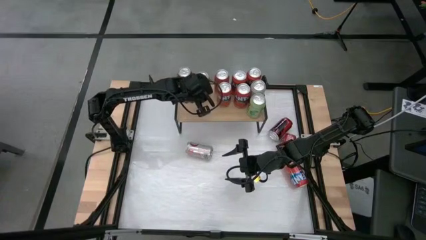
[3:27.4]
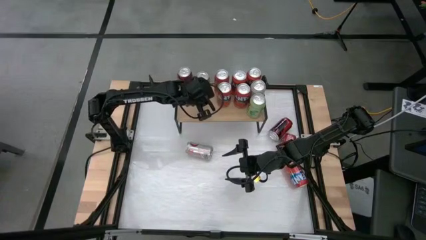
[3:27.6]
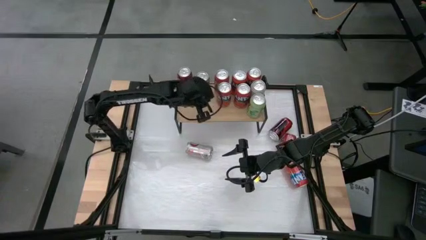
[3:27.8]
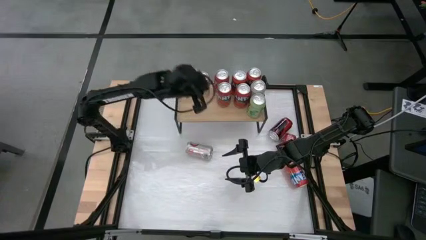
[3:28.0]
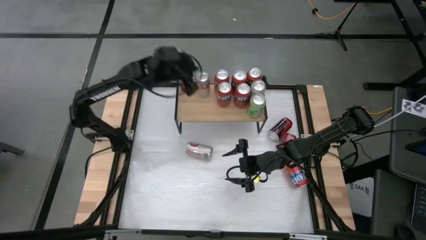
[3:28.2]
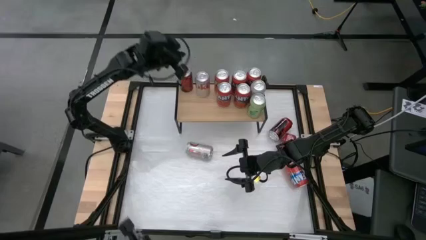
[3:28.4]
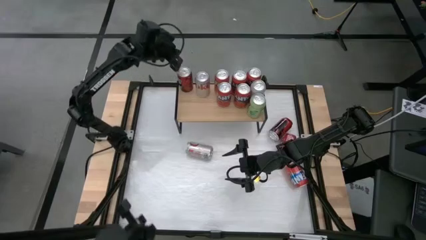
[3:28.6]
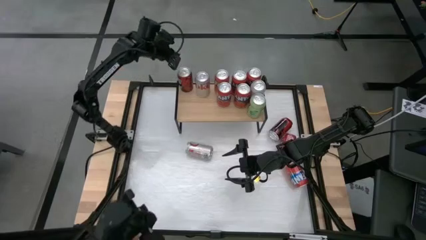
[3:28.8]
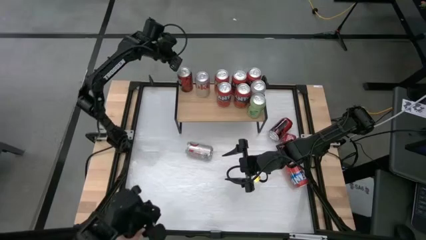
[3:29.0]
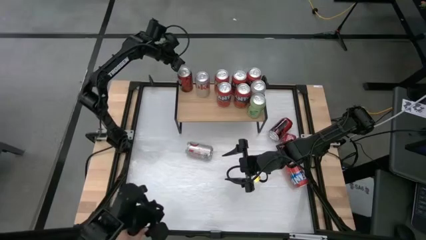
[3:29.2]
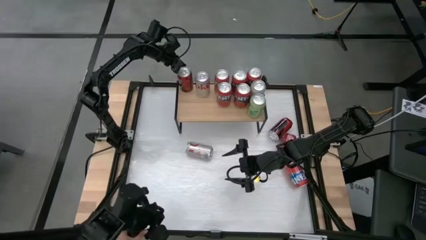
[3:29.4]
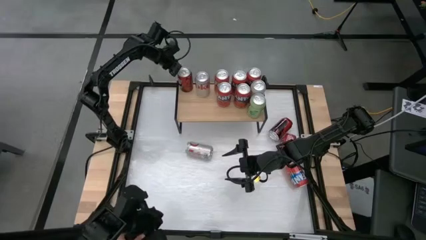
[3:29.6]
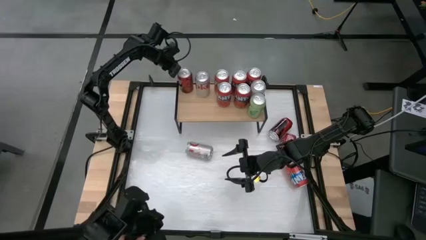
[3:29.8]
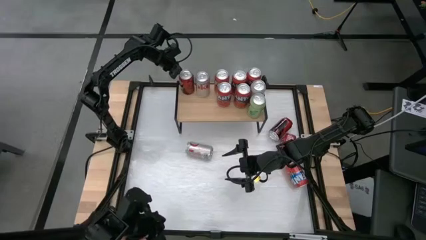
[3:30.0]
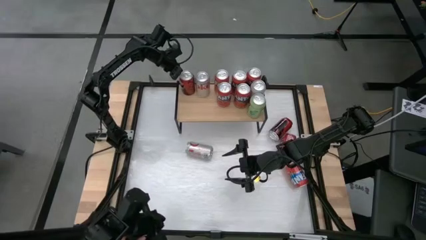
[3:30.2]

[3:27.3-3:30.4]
Task: Place canned beverage on shelf
Adjust the red black soda can on the shelf

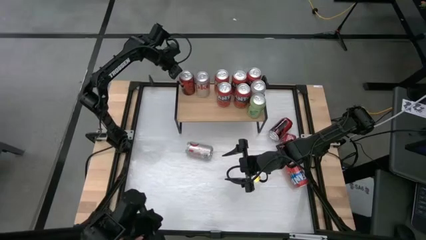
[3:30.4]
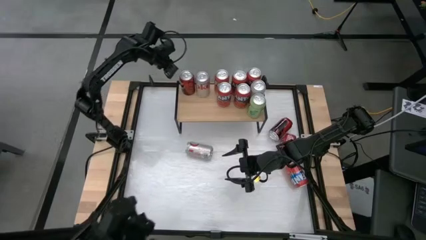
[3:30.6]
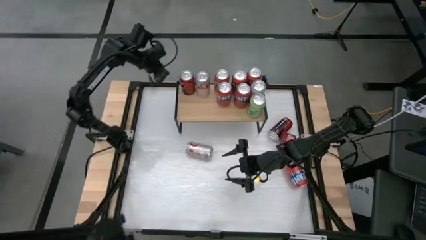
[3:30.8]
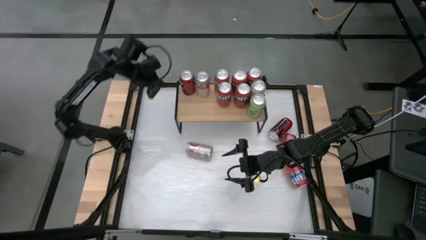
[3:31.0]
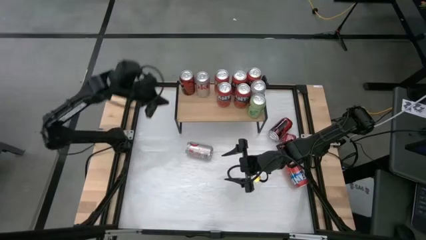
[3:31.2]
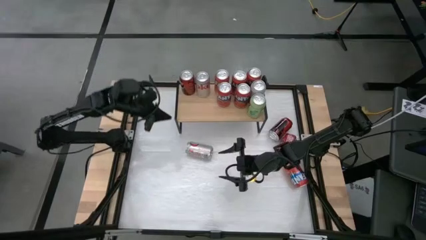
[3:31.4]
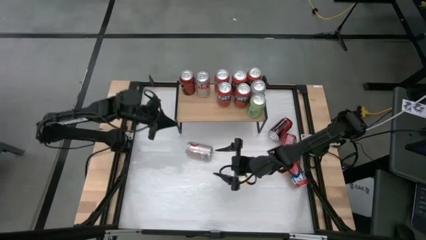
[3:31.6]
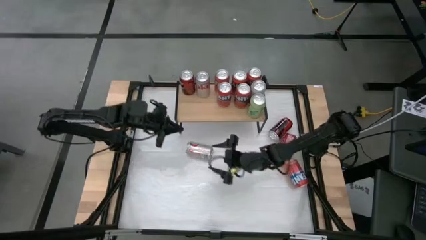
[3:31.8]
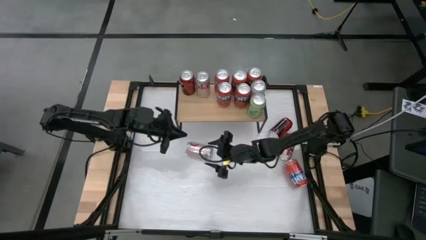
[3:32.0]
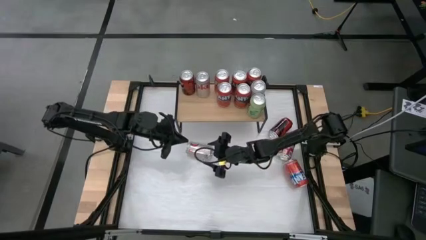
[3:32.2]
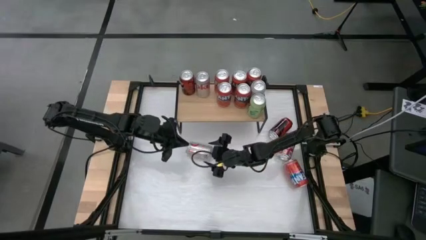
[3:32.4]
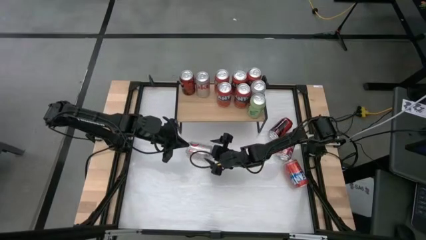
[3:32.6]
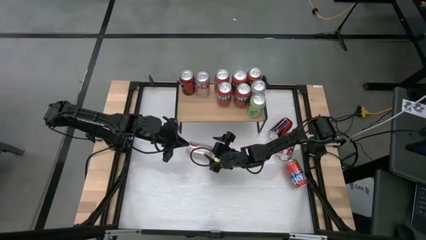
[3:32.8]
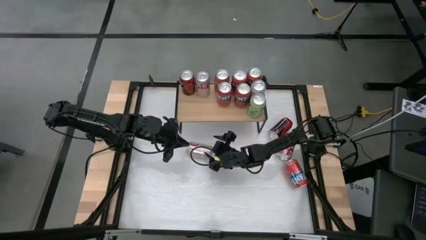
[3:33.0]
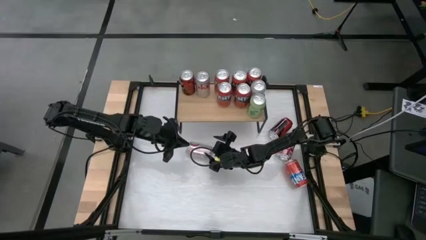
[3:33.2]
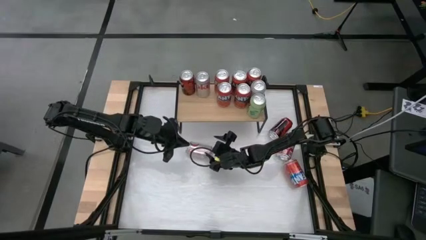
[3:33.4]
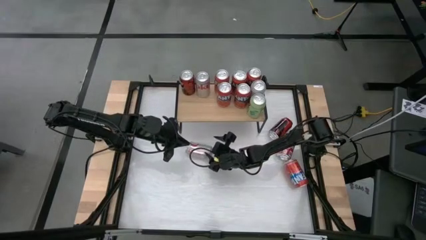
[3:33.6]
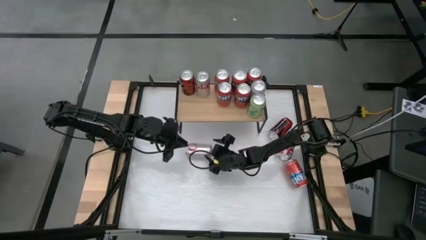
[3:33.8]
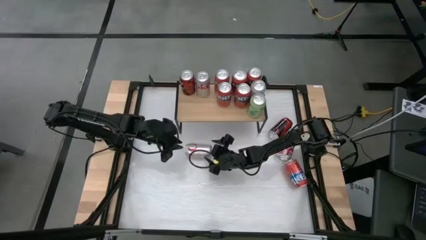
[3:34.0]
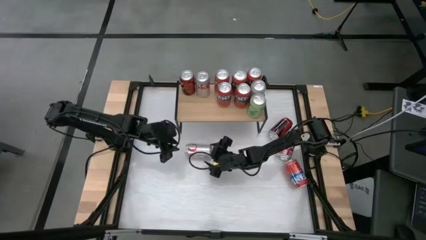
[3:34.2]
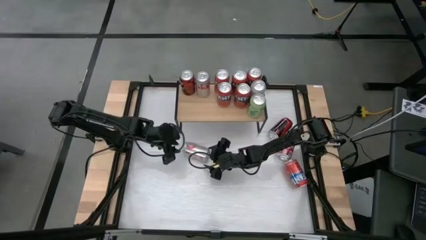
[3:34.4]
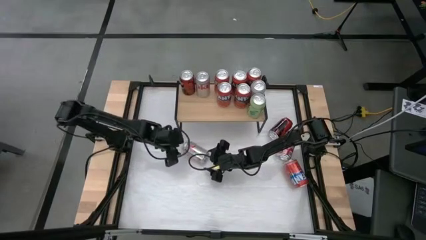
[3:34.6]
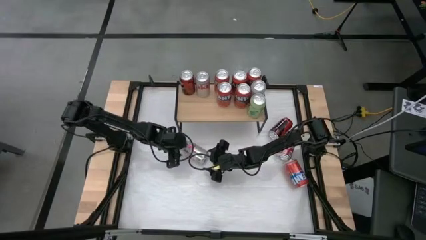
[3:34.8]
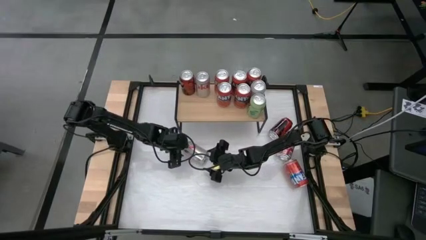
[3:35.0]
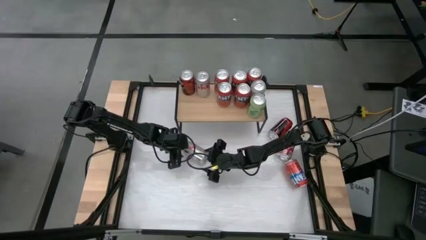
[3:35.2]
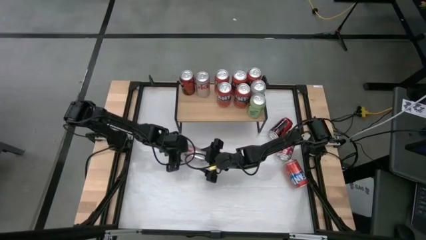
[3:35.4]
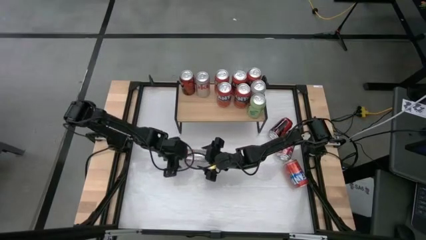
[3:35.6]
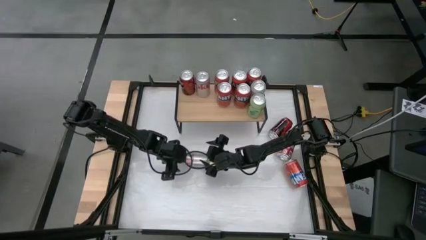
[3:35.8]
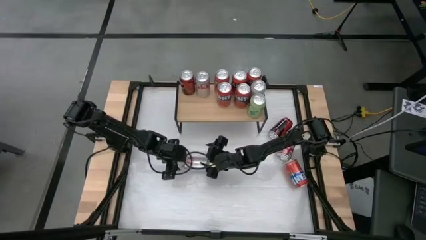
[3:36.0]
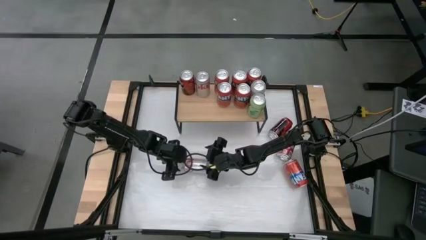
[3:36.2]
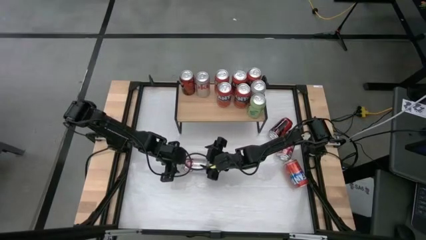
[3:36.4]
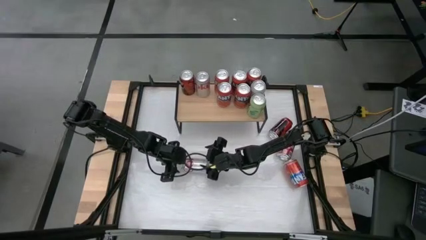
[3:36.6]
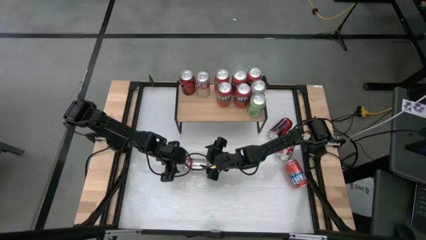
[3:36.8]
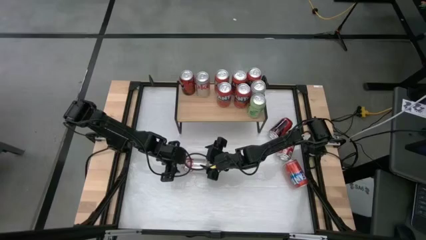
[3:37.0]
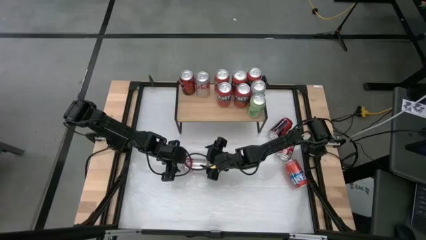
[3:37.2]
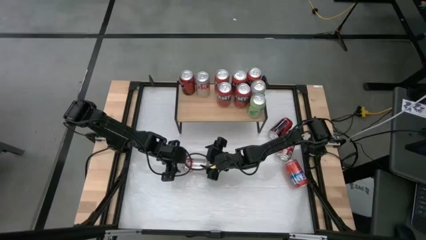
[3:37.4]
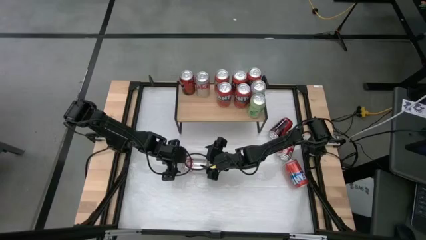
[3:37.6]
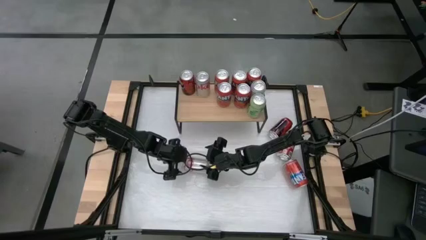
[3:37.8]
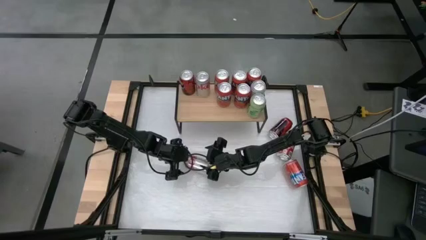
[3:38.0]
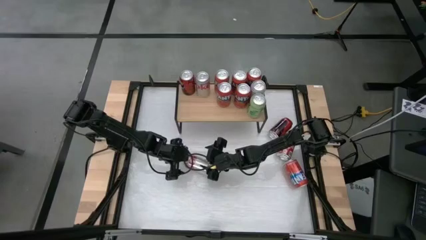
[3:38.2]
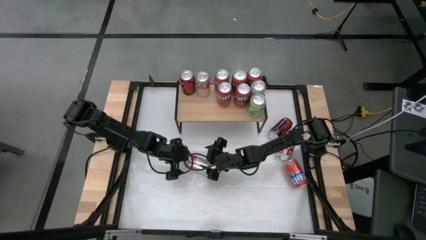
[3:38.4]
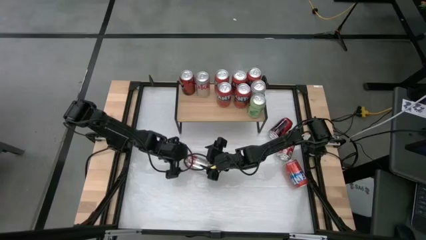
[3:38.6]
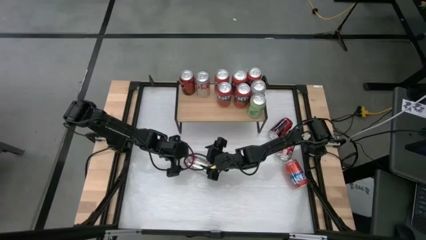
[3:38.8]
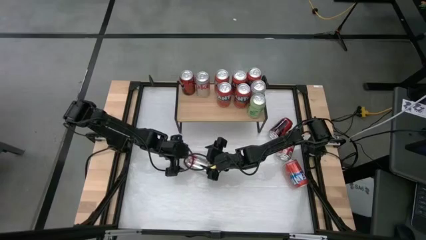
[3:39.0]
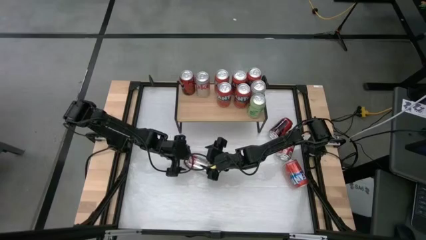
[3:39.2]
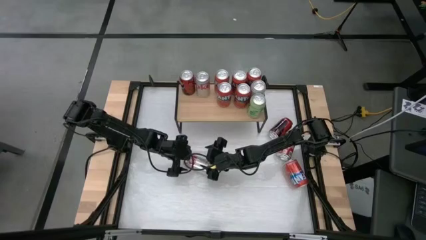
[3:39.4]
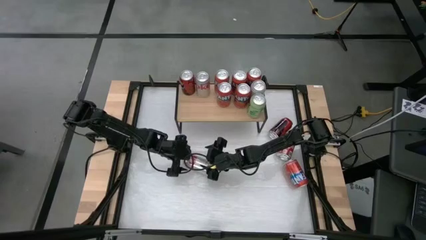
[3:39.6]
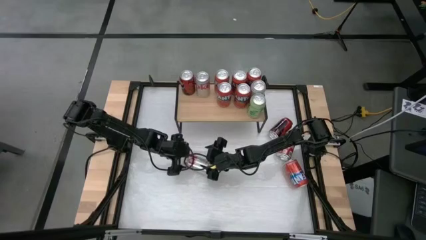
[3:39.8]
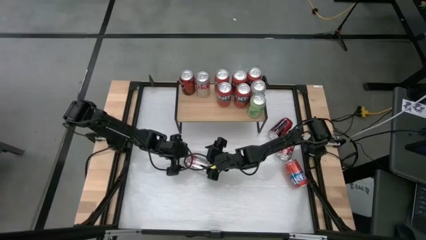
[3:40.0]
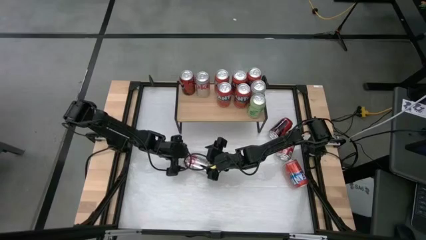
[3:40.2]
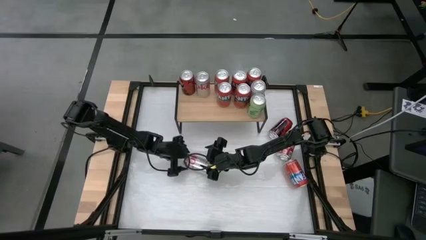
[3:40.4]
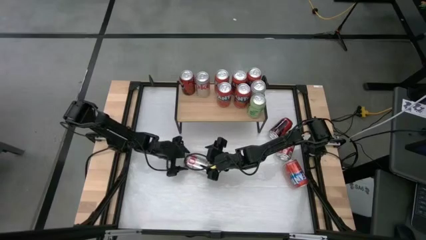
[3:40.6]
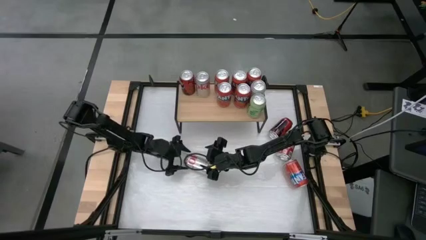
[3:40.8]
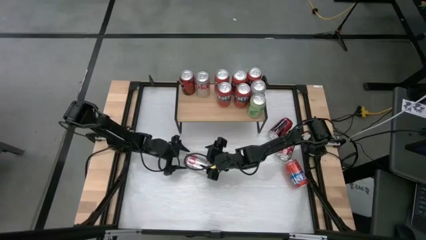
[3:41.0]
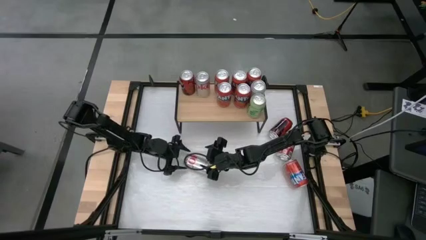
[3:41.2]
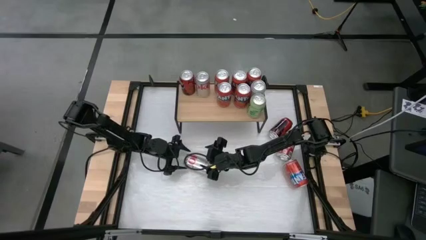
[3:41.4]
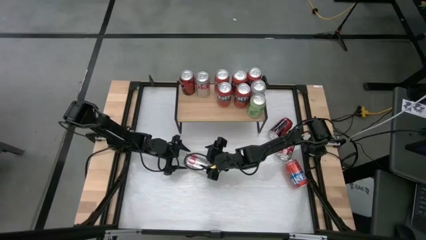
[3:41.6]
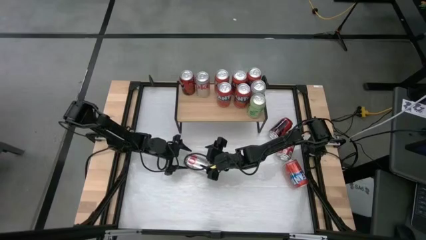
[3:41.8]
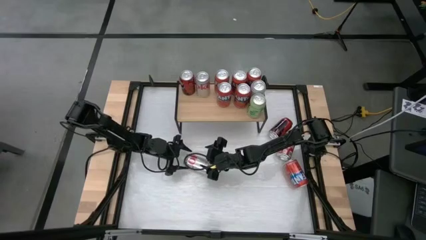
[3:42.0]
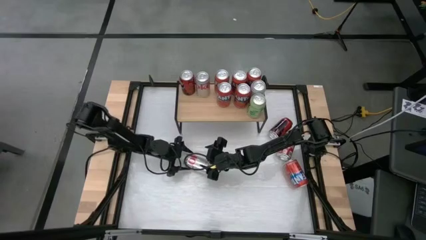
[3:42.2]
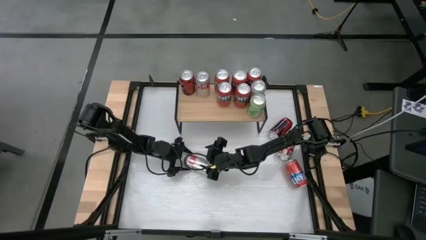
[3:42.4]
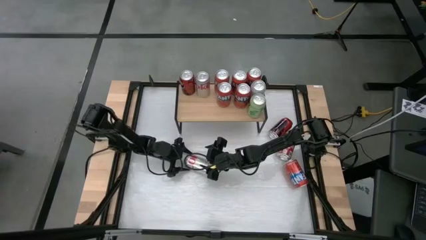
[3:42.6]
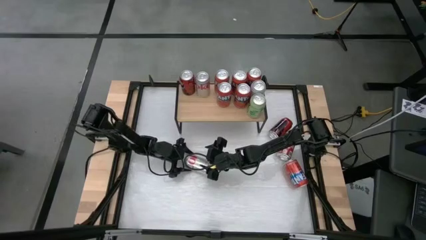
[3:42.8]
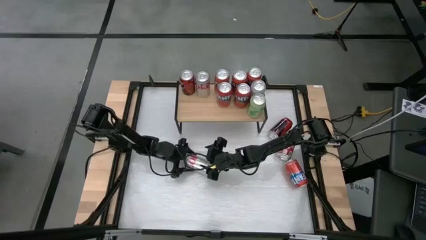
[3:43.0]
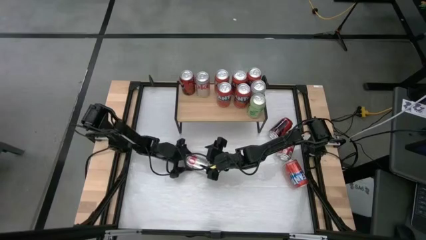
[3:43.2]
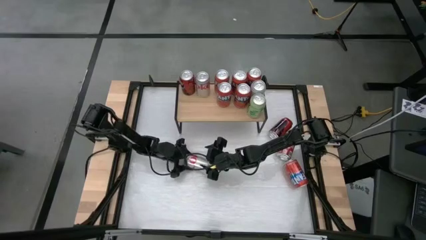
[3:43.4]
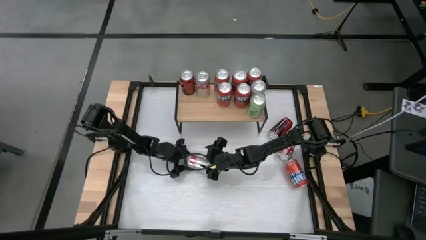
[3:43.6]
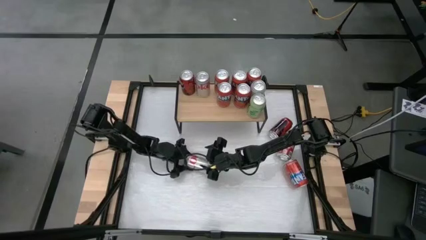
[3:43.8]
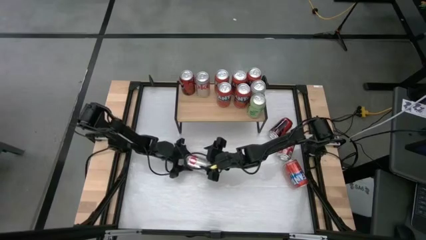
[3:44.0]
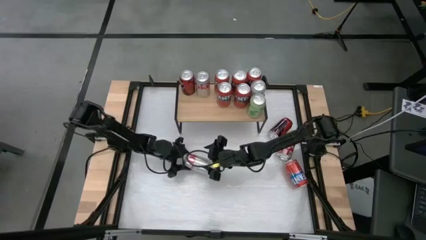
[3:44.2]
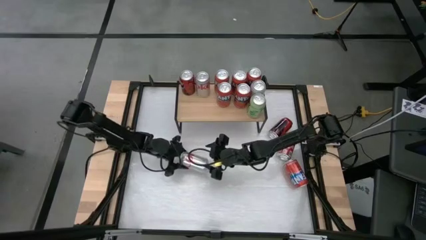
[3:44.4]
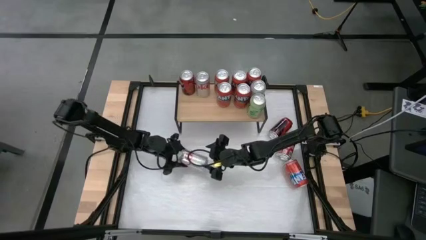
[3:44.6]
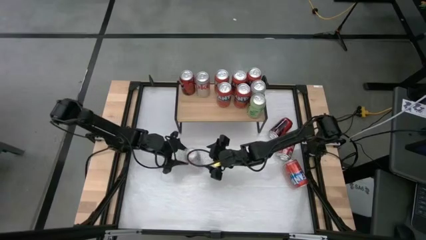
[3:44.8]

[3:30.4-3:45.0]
Put the red white soda can on the shelf aligned with the other red white soda can
